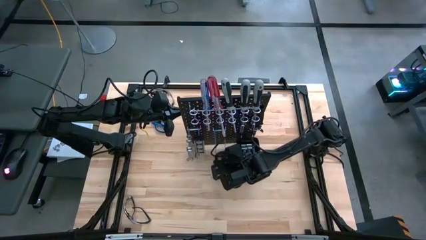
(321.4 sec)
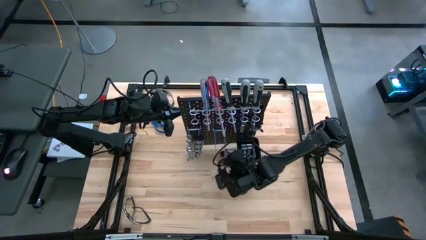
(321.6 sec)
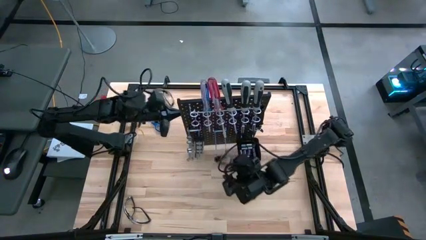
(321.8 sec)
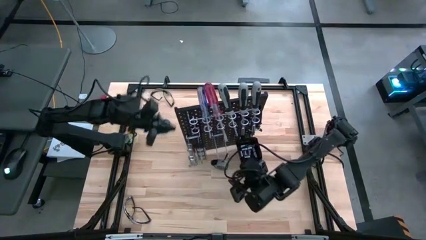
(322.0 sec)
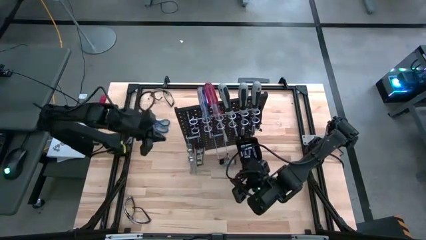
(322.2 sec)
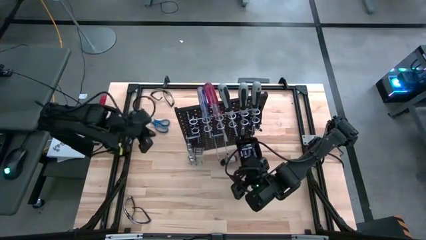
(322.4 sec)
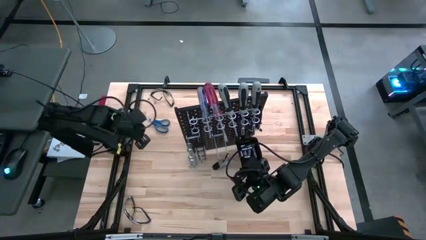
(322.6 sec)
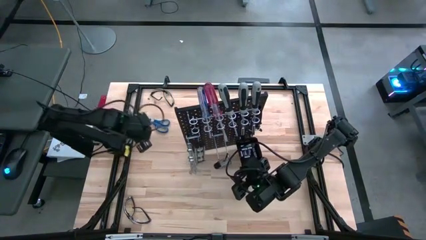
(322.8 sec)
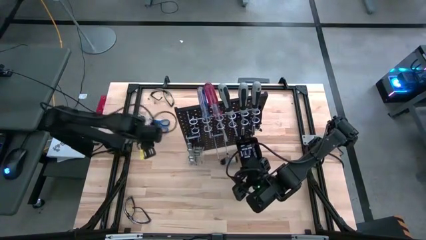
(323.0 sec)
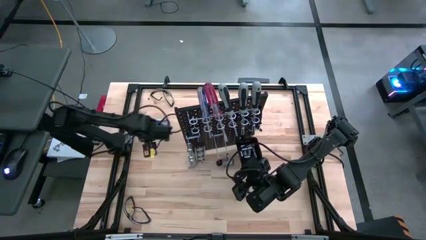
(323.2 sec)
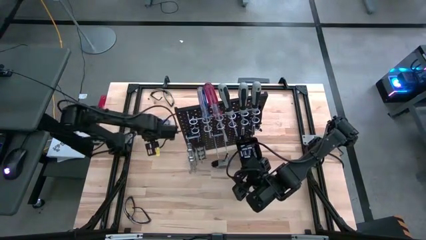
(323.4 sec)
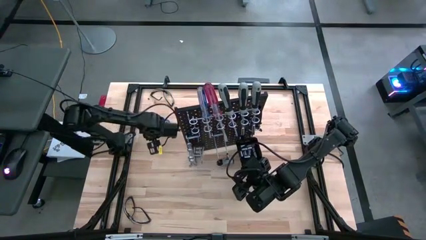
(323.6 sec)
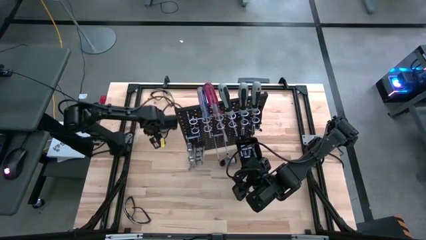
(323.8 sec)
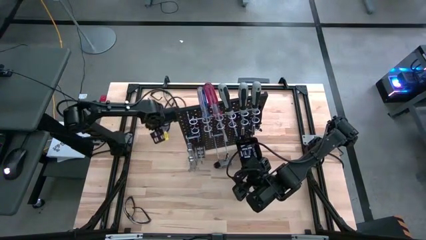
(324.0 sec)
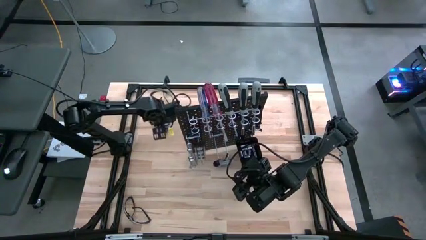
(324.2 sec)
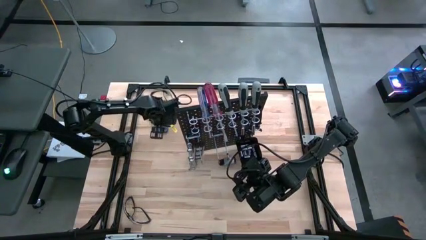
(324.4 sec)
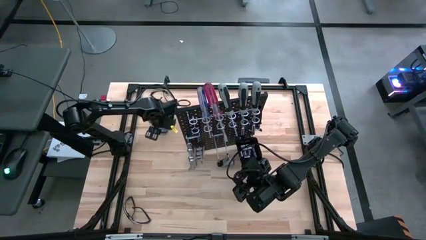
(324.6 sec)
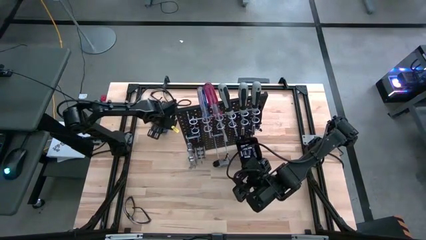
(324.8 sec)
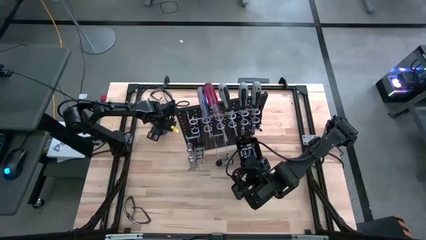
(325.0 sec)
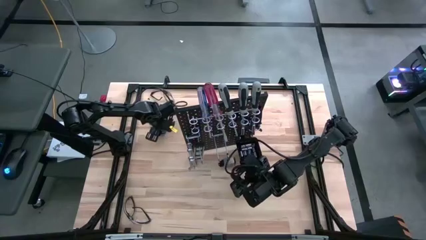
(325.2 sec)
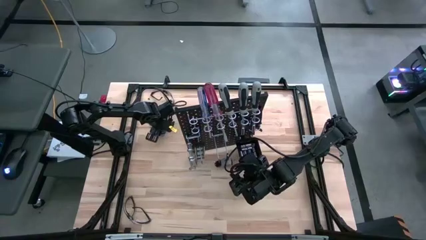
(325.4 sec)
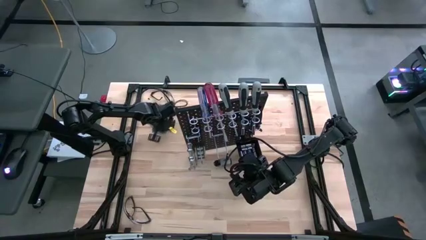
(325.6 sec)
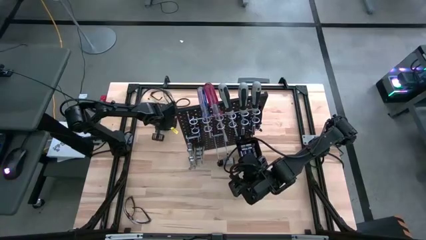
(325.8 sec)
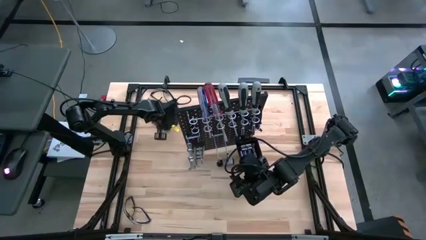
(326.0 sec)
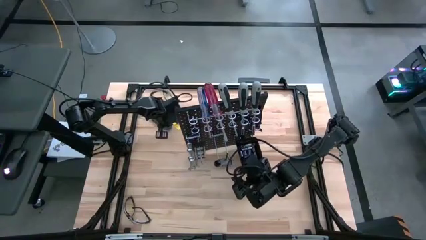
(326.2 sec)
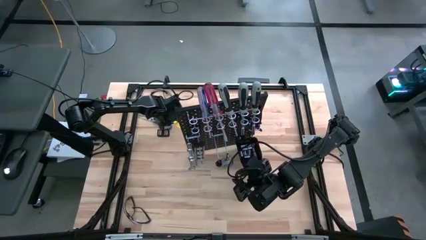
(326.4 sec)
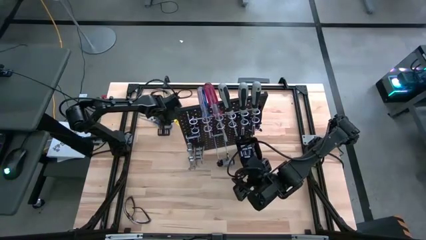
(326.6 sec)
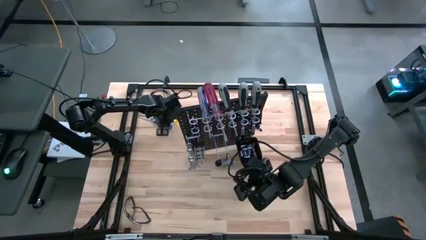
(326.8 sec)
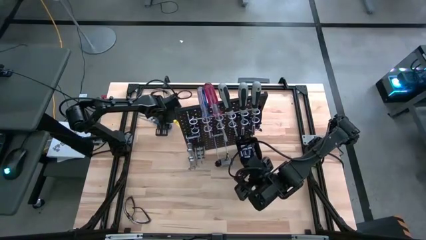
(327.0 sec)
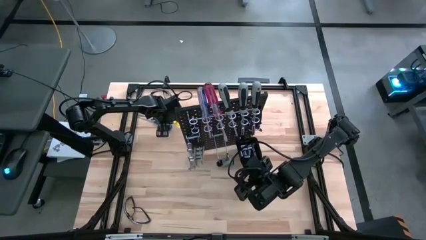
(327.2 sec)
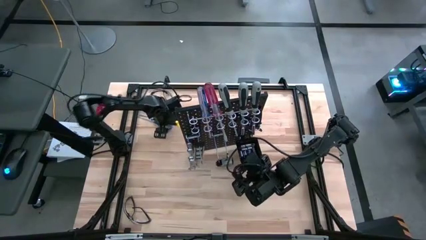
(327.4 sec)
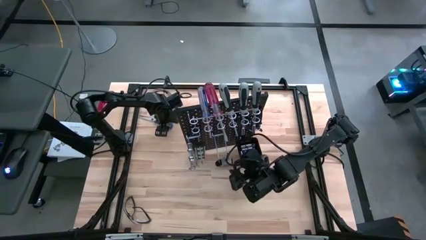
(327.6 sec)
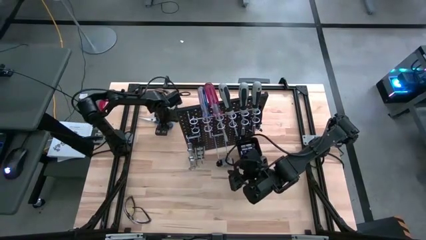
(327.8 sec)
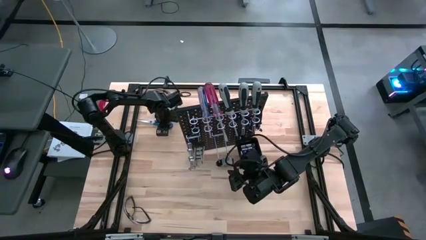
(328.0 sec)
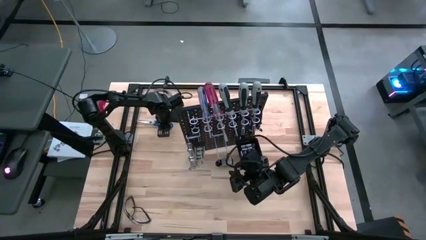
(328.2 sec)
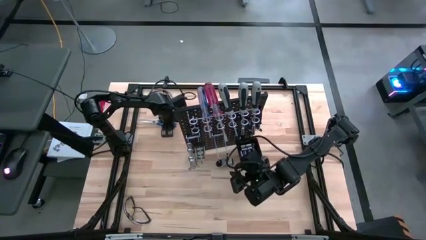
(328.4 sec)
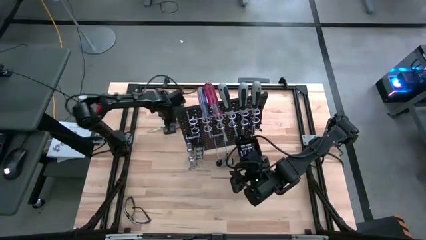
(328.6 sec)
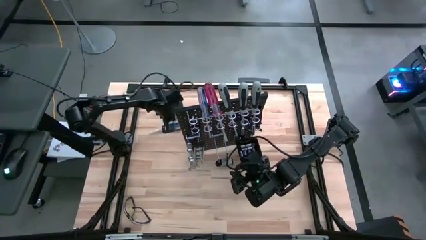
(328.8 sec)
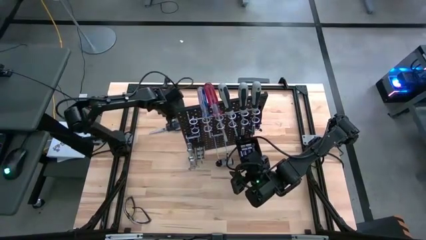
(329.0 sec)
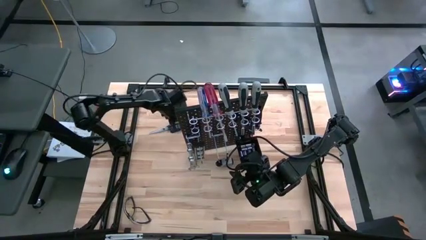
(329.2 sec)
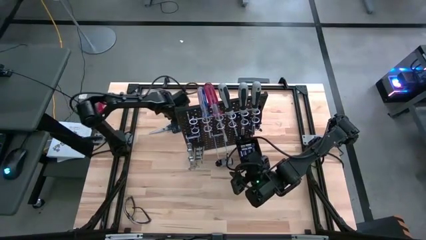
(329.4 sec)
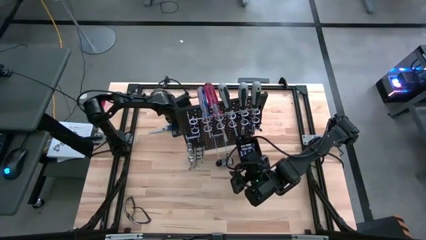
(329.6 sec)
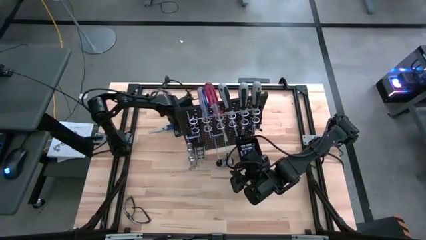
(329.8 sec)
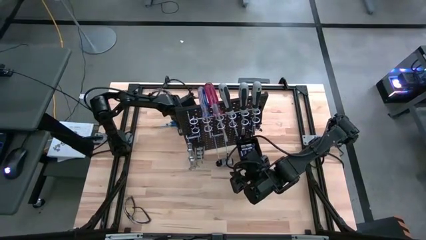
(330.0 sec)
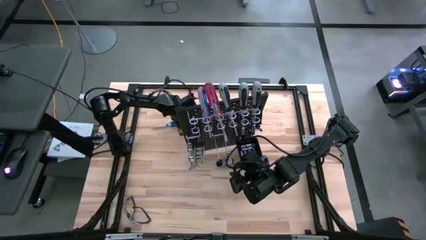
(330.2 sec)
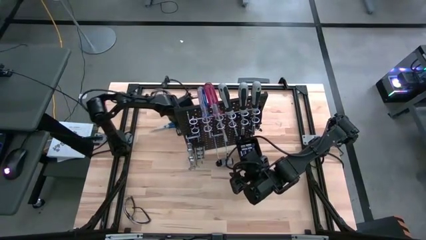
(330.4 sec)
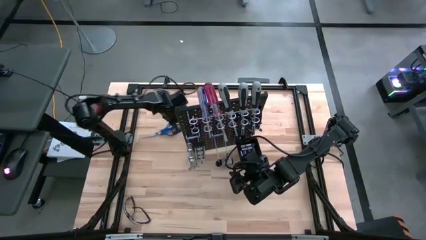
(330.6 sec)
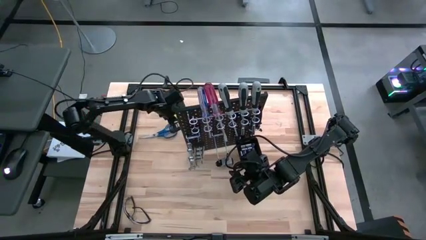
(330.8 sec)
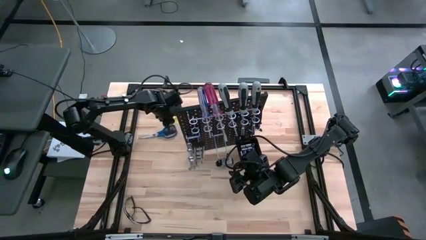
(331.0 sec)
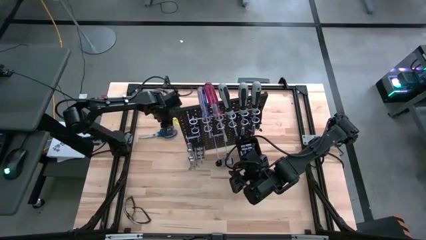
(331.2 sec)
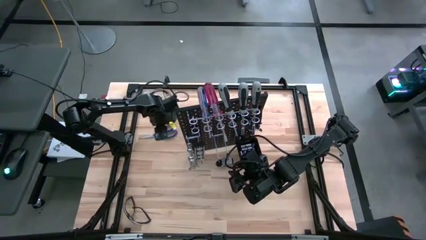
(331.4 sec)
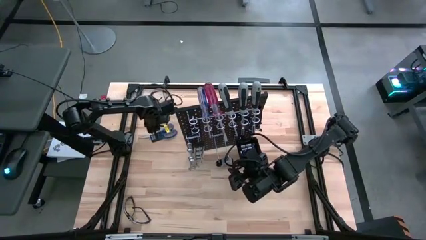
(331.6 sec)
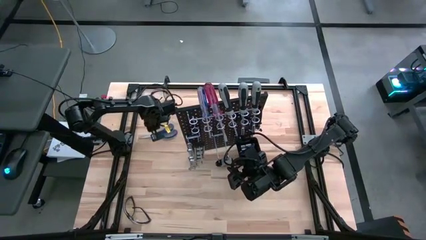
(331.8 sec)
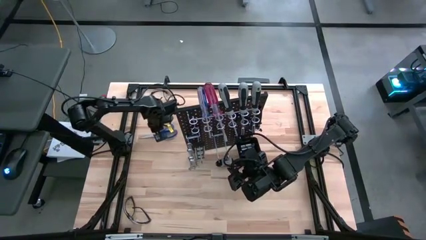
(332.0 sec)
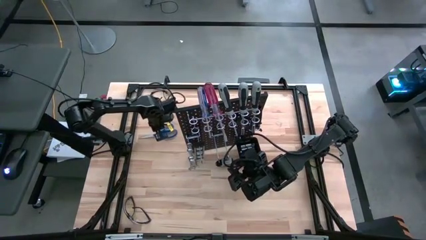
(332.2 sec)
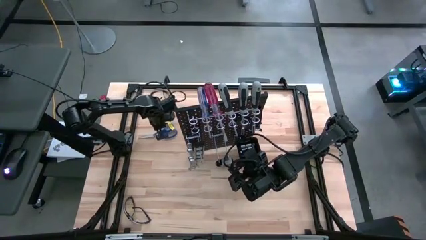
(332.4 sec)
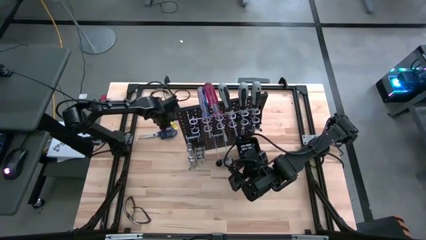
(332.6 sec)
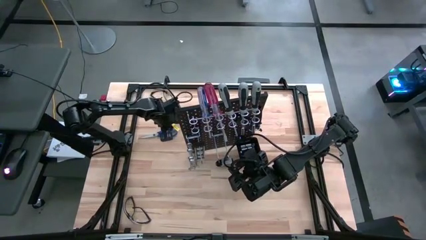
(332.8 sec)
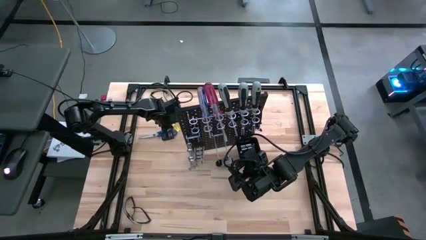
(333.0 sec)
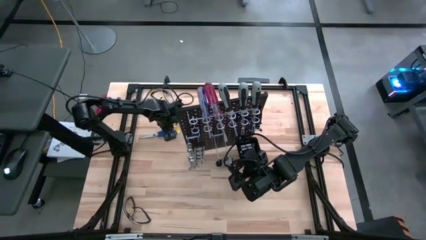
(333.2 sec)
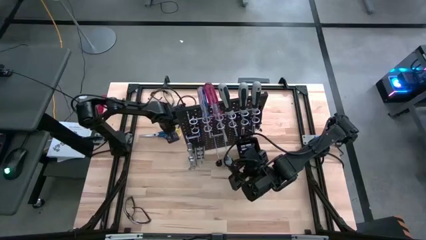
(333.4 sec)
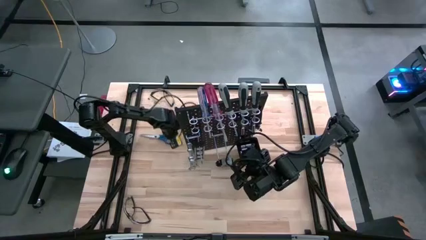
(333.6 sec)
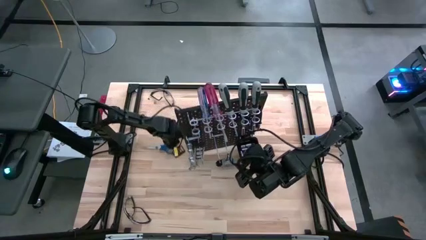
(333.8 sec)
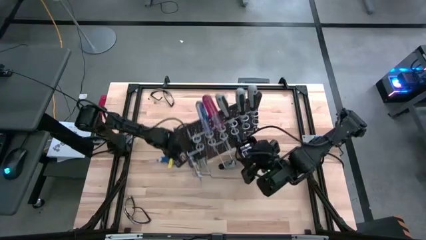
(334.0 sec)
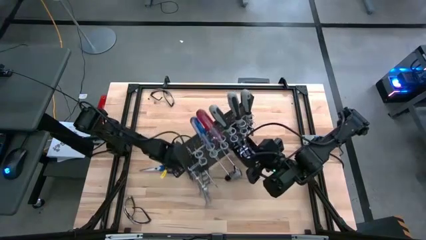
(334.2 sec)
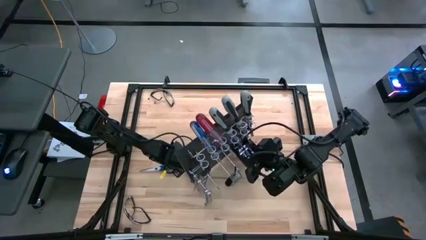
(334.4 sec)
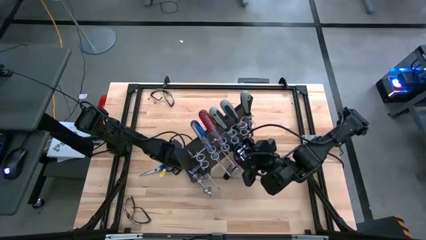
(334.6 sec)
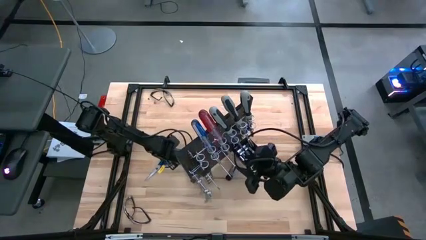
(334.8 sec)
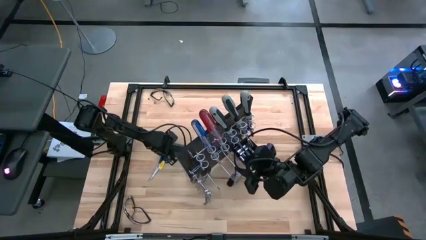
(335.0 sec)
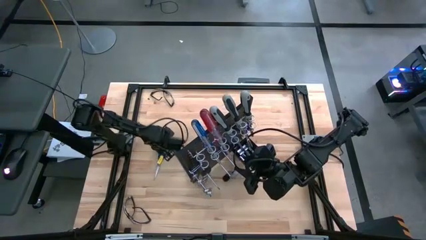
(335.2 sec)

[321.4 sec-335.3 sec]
Task: Hang tools onto peg board
Hang the blue scissors on the pegboard

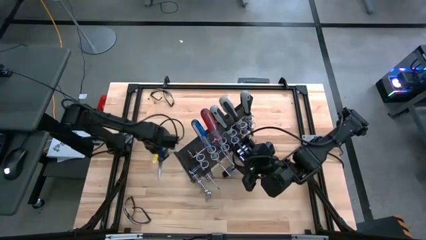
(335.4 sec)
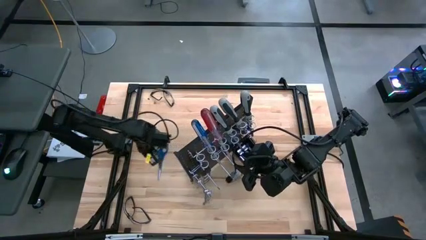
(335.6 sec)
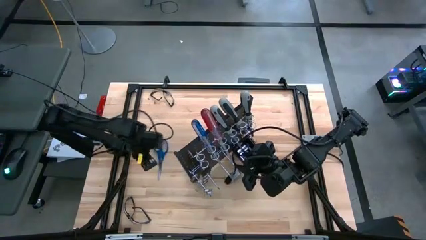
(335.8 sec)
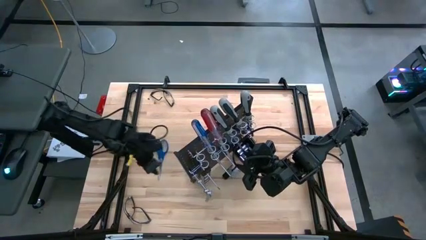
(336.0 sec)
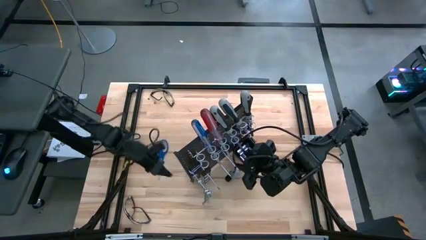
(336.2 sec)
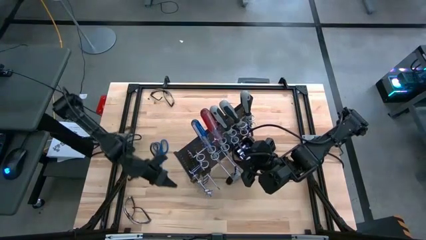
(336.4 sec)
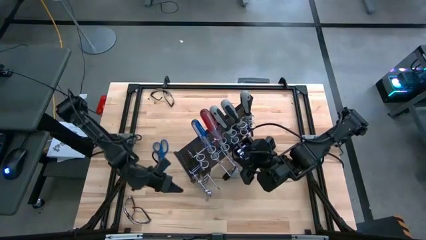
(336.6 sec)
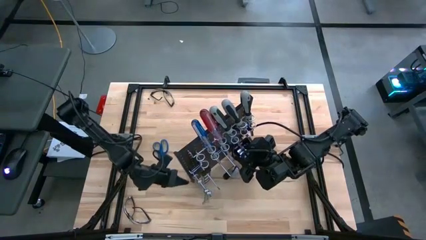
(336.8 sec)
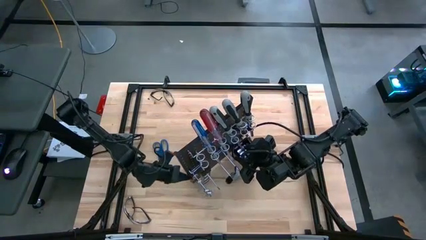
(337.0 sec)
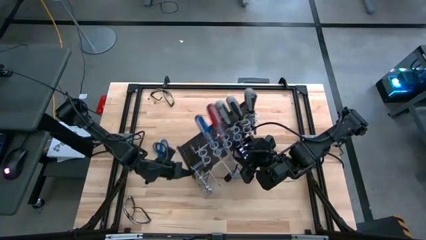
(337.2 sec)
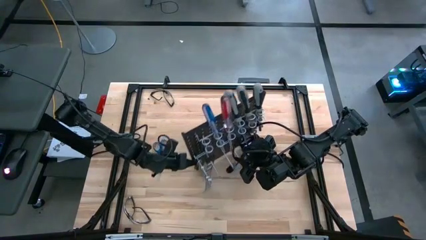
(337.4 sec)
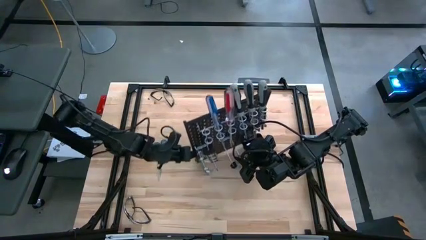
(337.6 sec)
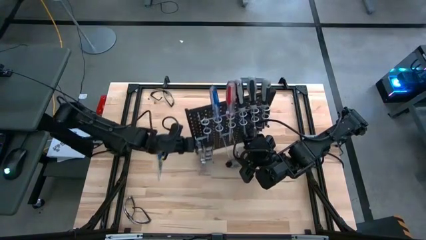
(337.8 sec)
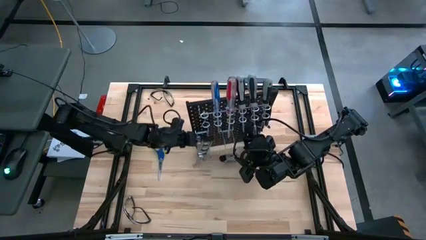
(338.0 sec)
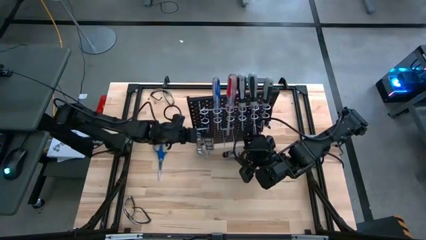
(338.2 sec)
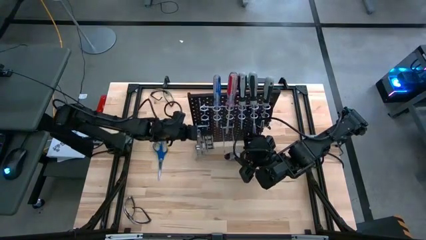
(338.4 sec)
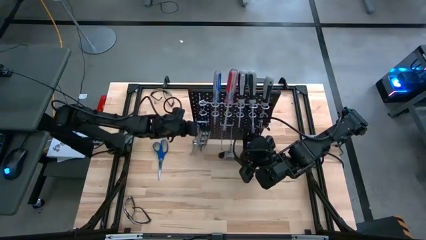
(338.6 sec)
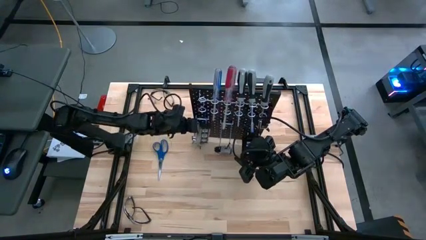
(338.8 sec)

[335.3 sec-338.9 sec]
Adjust the pegboard
